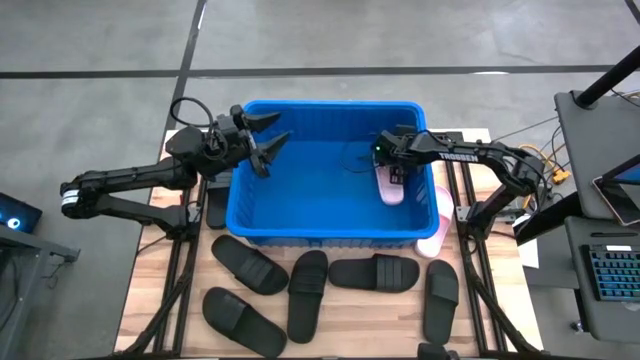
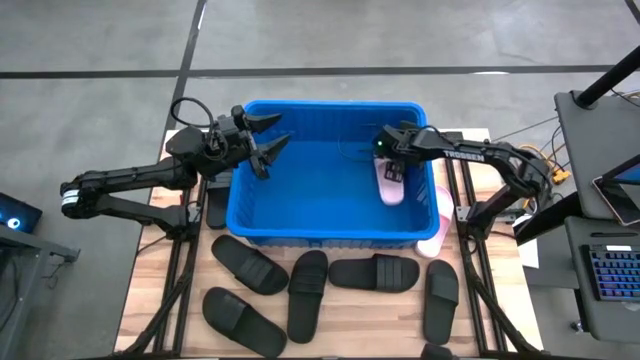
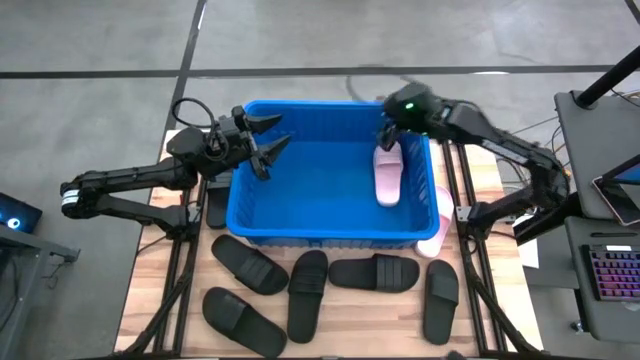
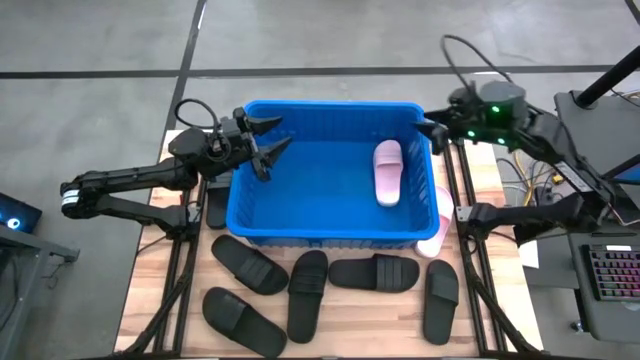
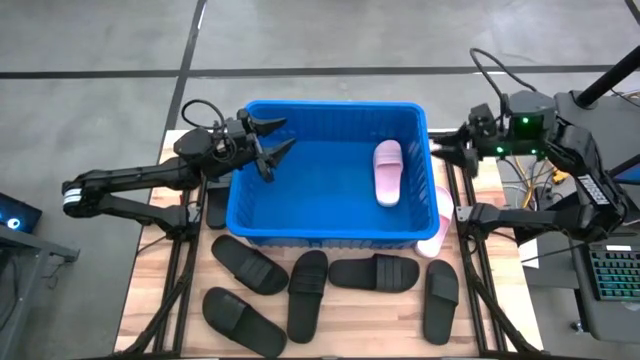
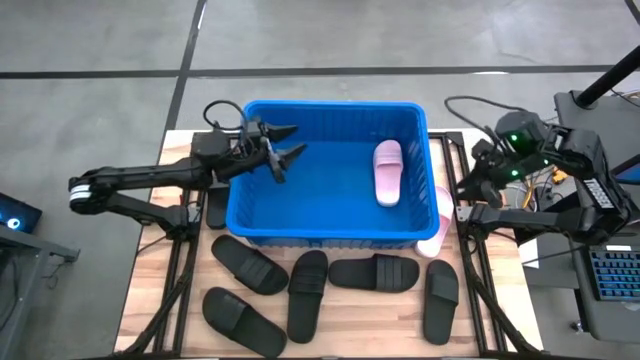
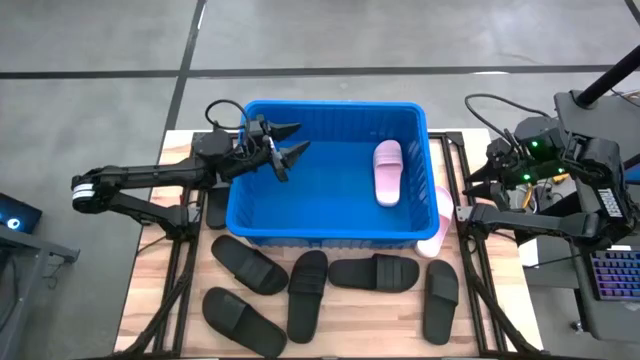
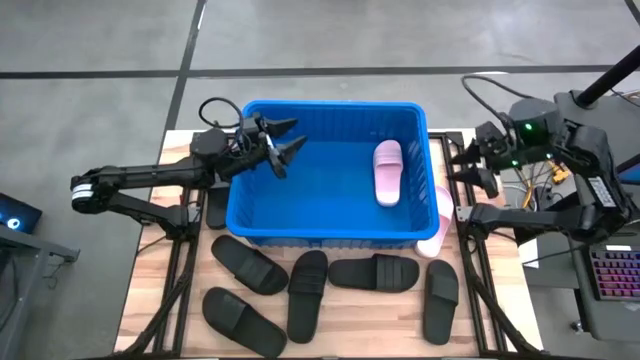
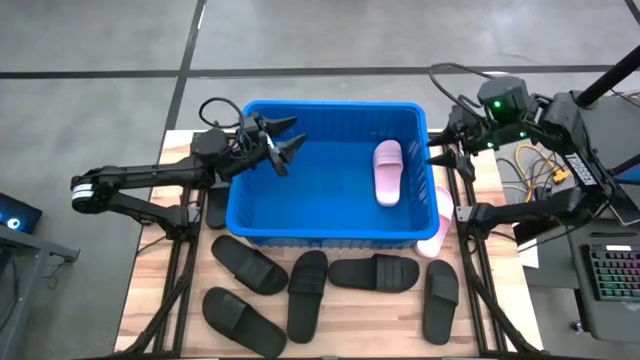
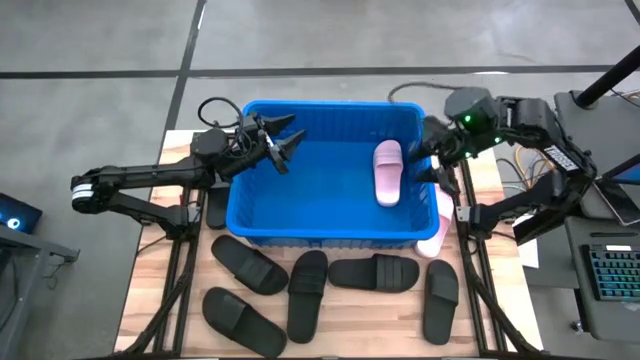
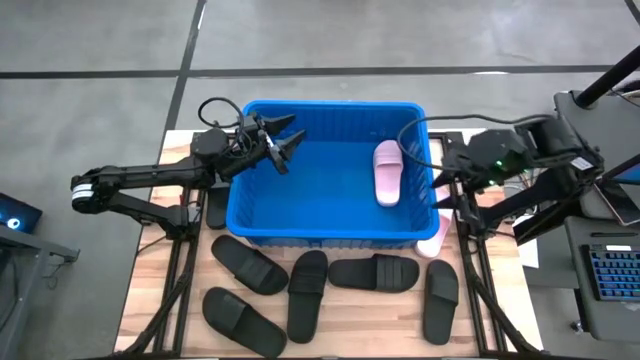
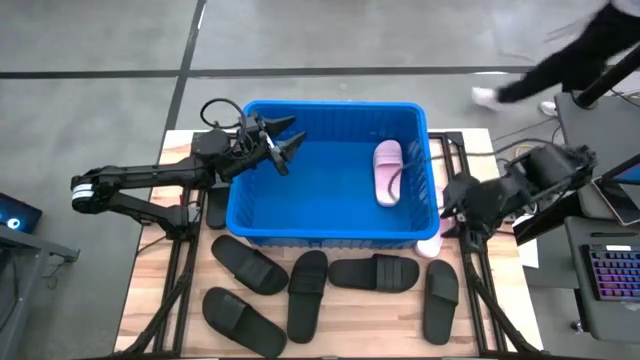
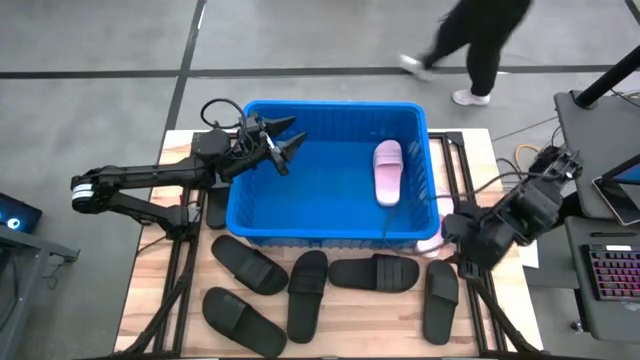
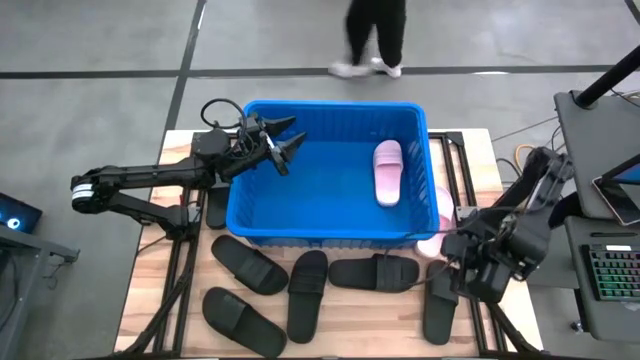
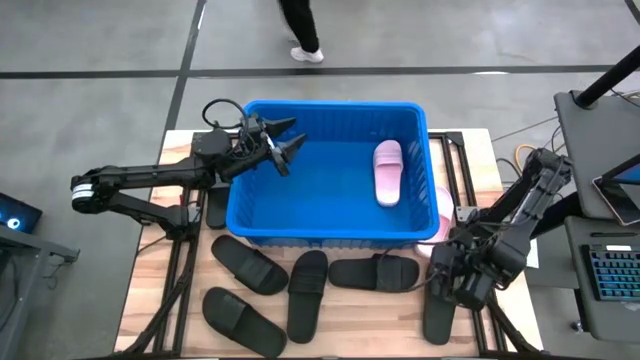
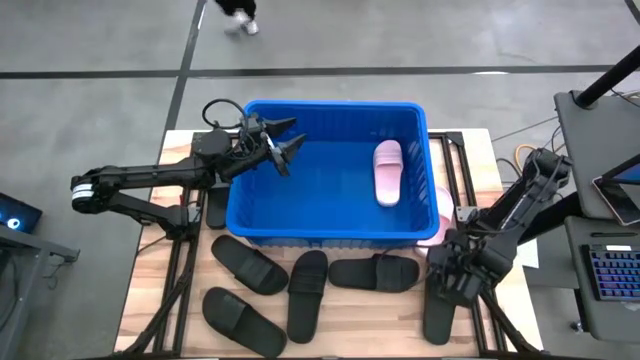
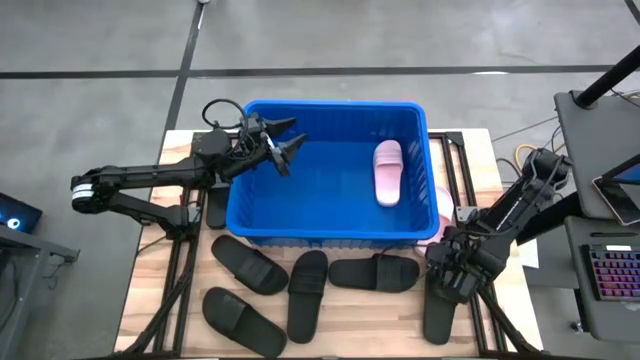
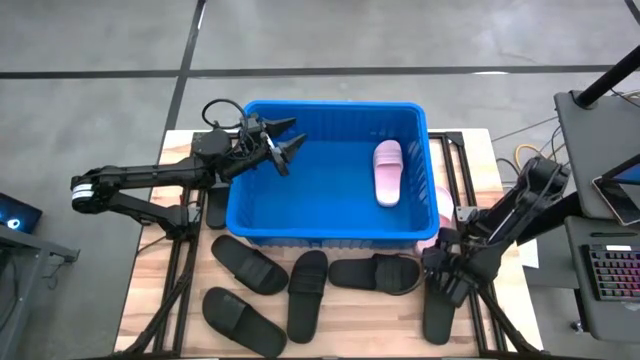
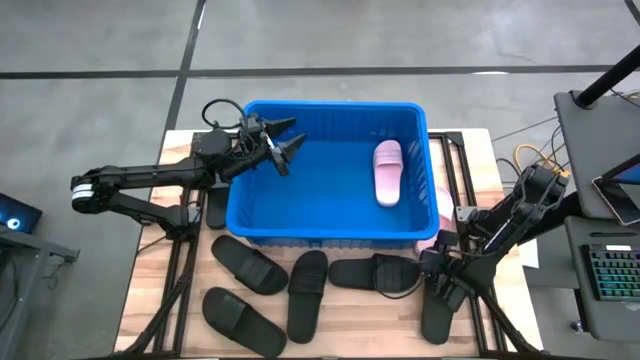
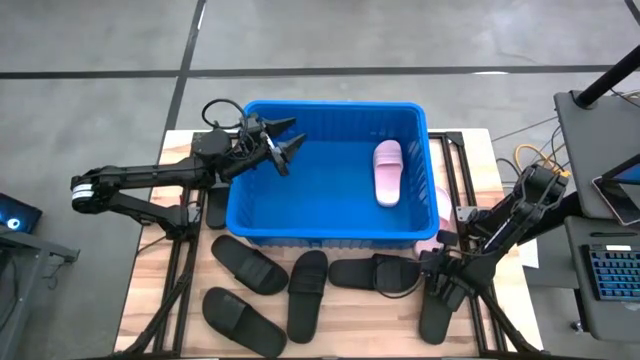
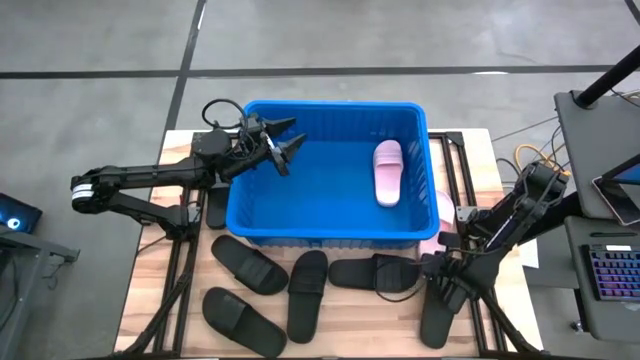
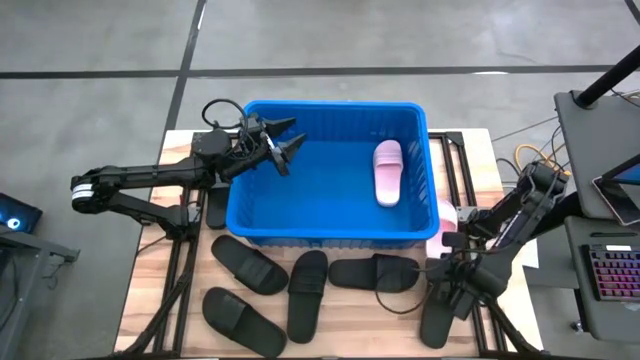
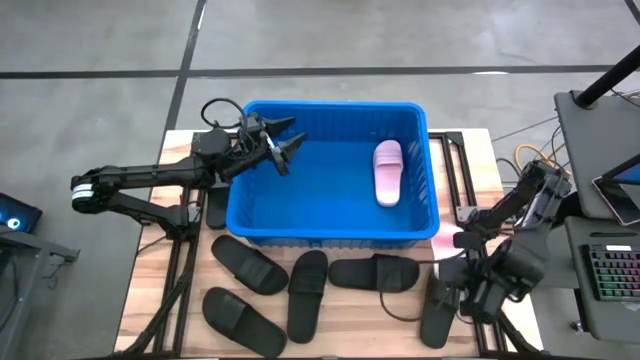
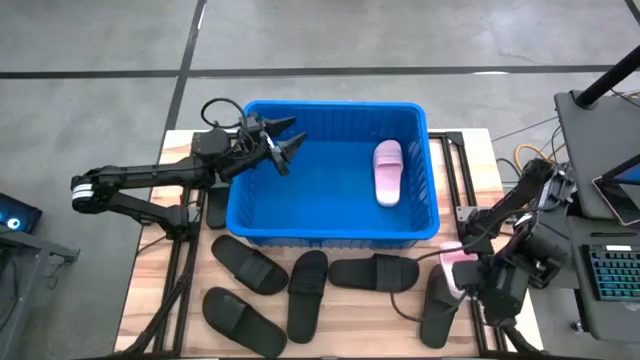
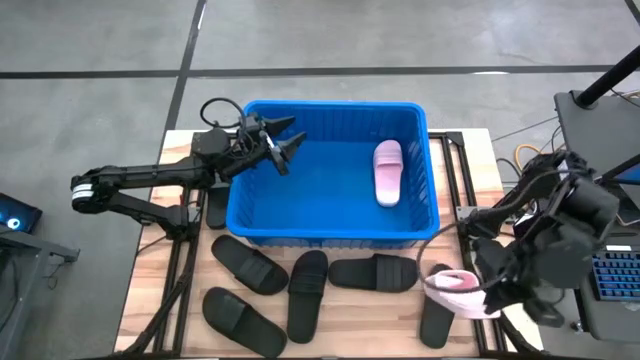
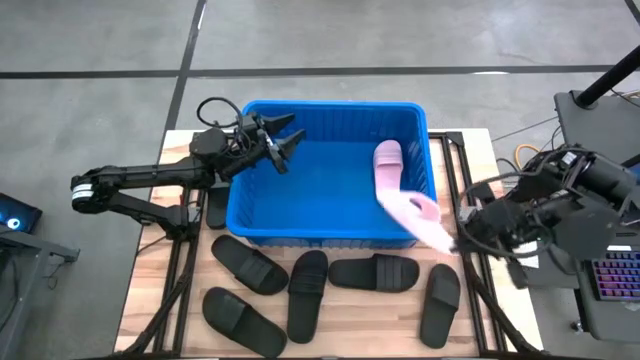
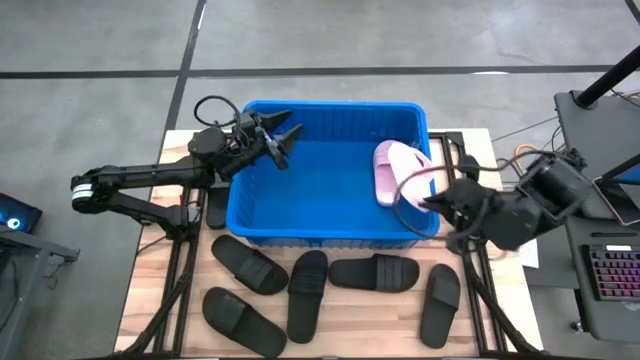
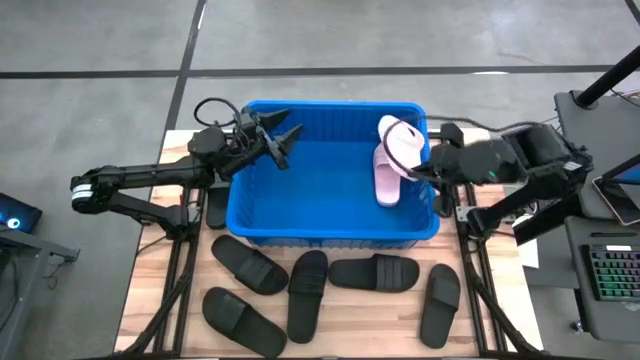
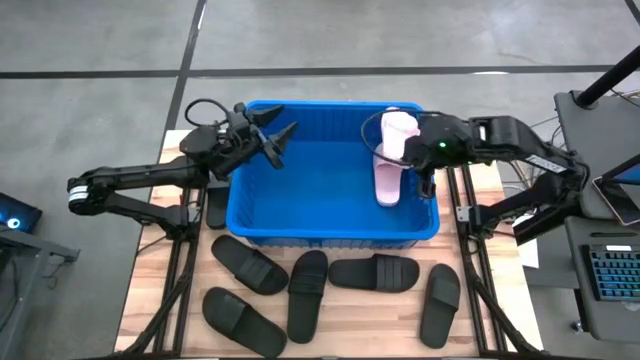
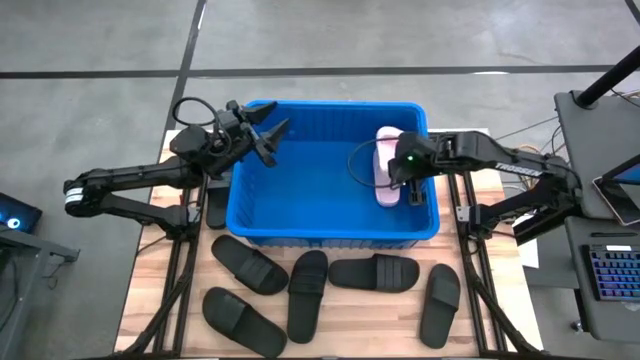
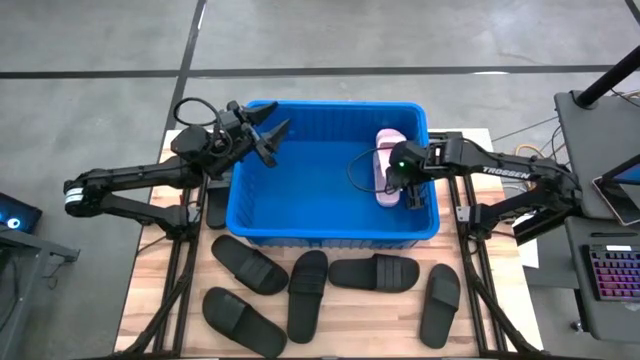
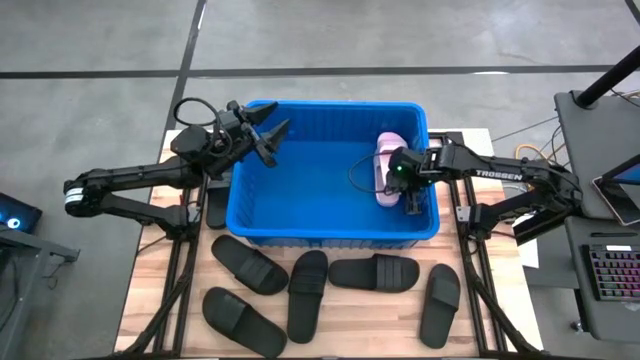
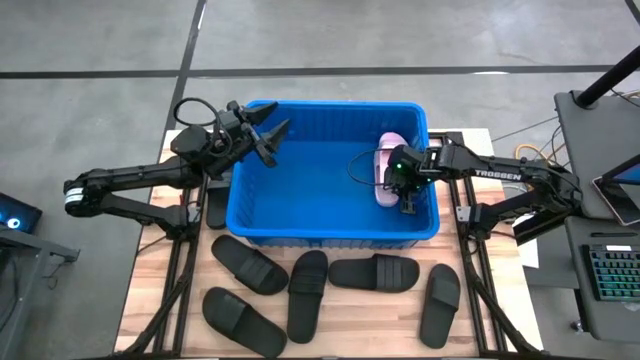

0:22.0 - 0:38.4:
Task: Pick and place slides into bin
Put the pink slide into the blue bin

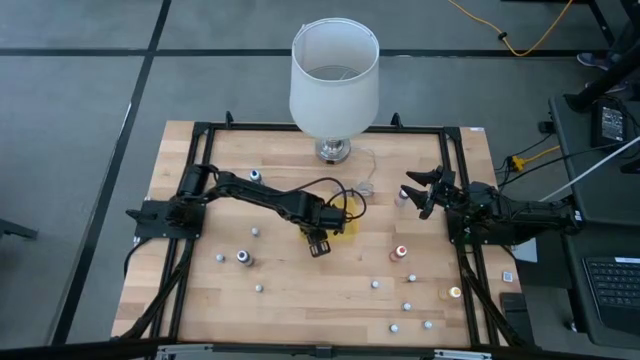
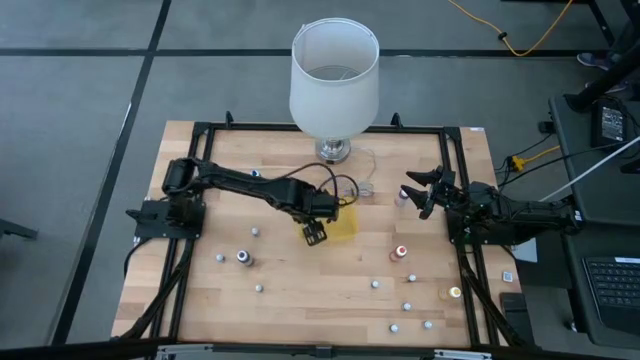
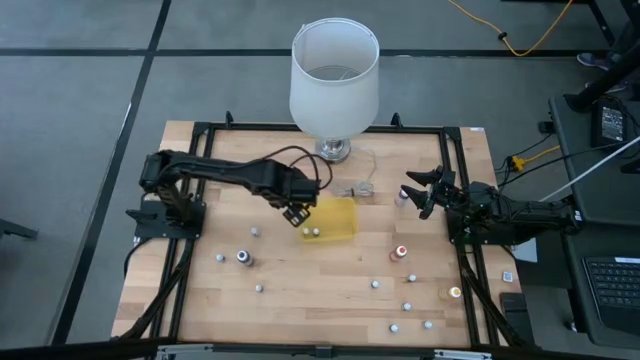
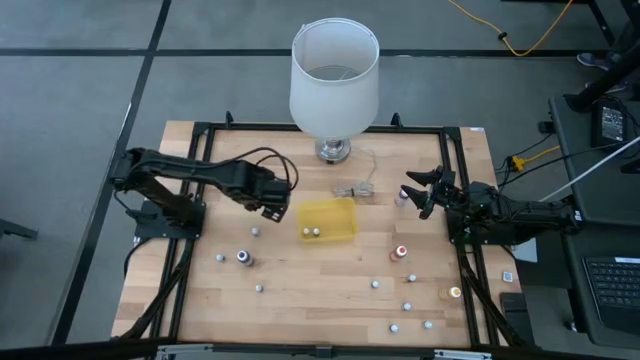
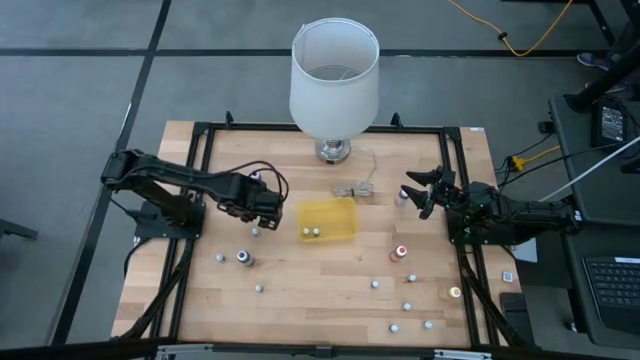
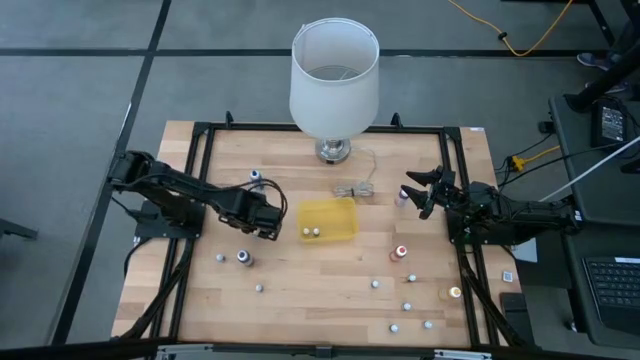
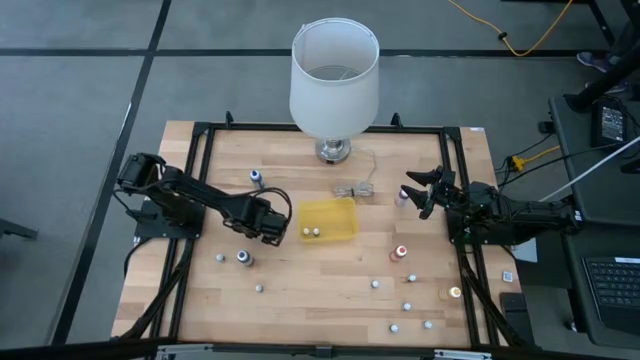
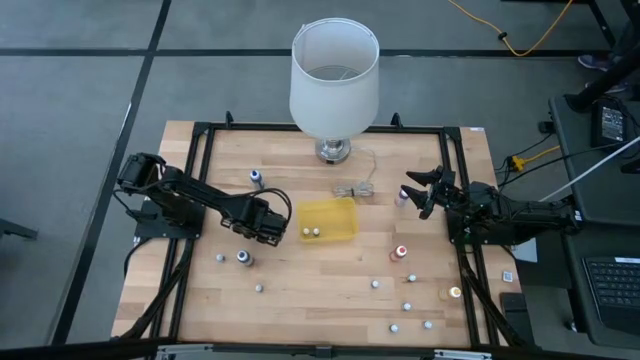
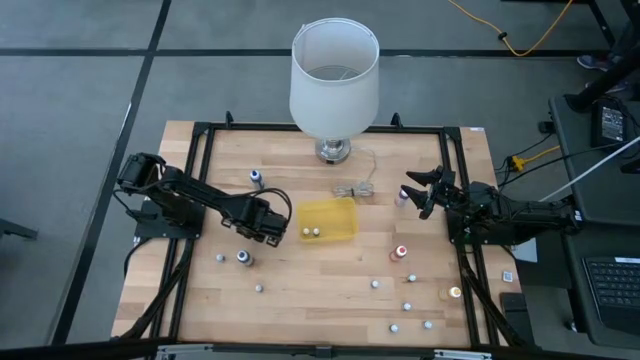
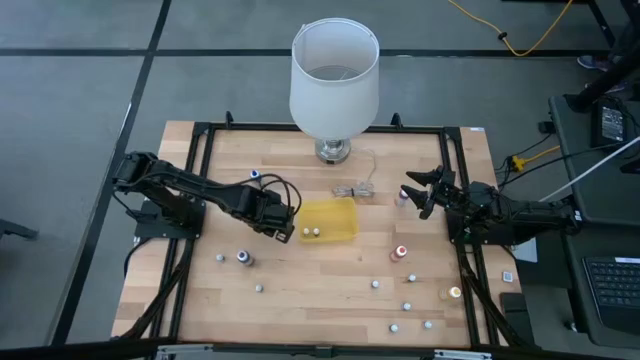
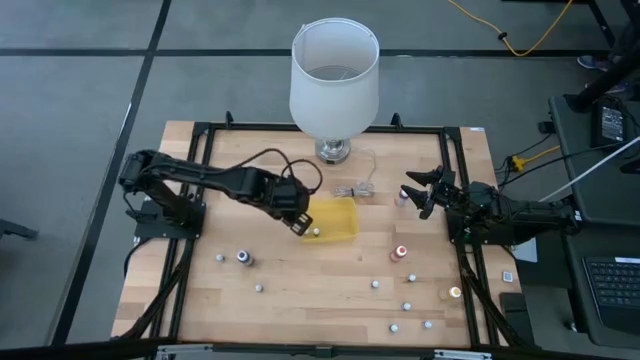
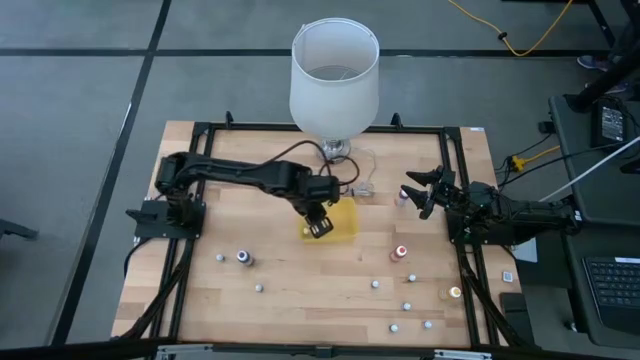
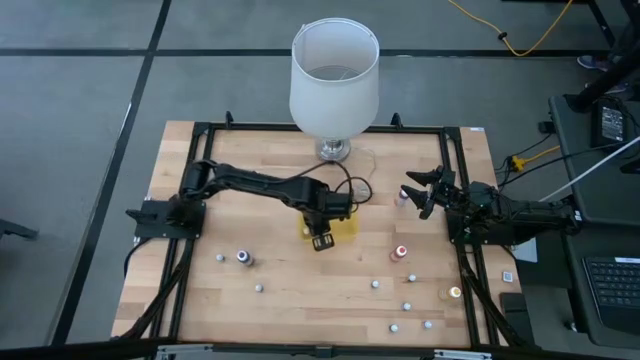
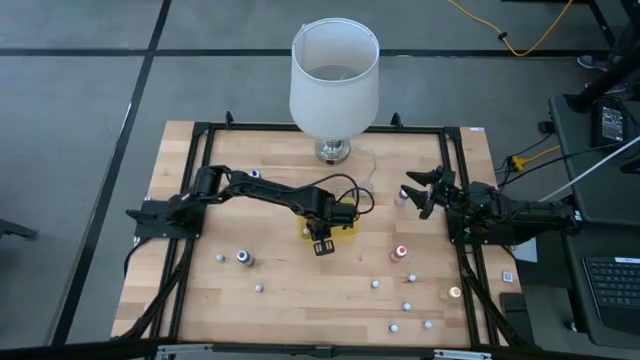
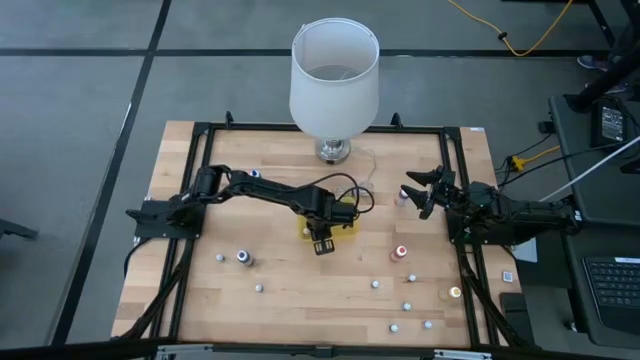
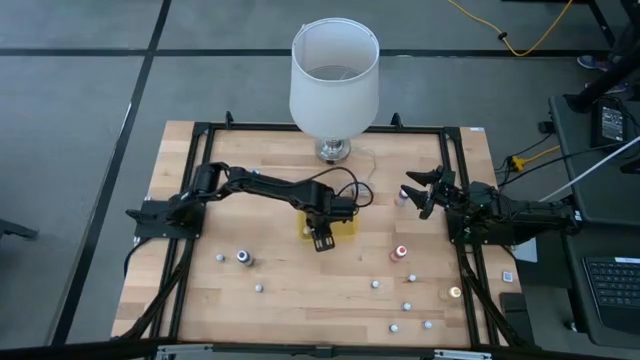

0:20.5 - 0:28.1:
Task: Pick & Place food coloring
Put the small blue food coloring bottle into the yellow bin
